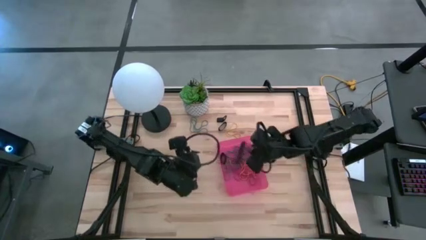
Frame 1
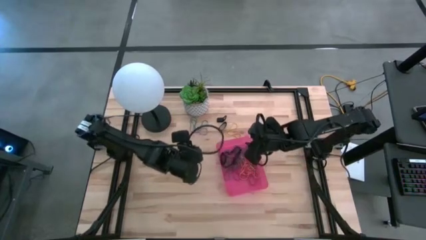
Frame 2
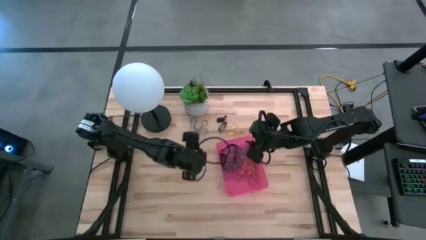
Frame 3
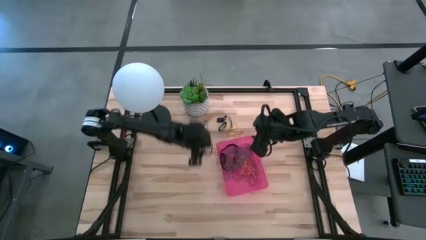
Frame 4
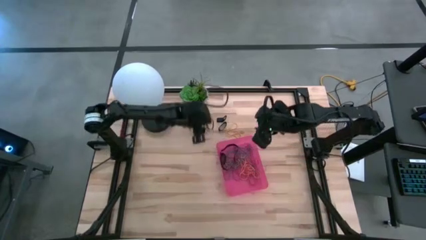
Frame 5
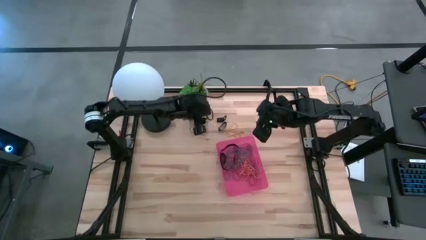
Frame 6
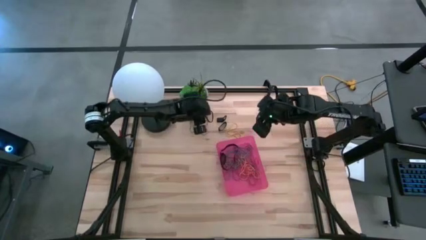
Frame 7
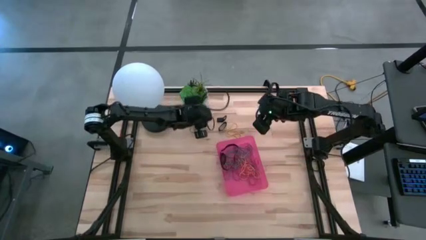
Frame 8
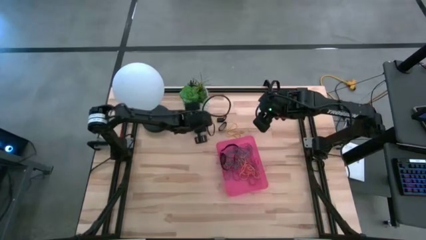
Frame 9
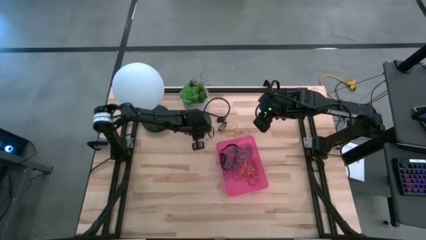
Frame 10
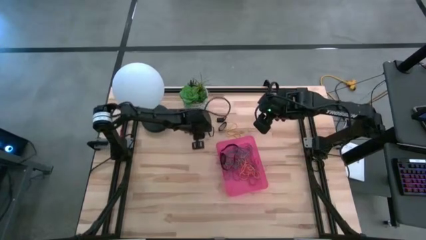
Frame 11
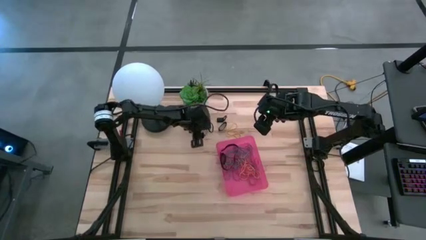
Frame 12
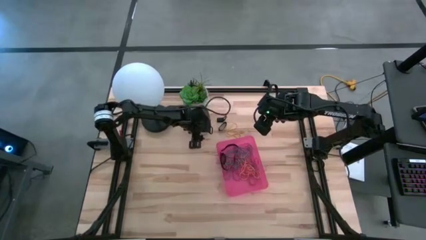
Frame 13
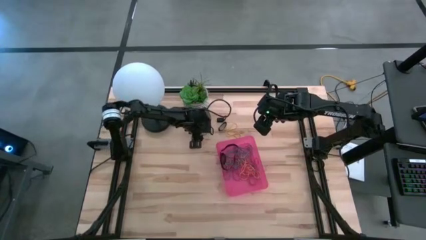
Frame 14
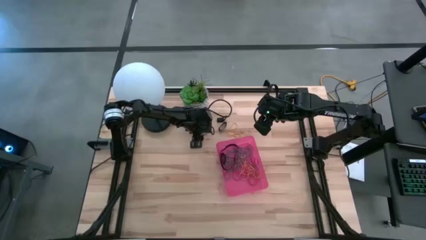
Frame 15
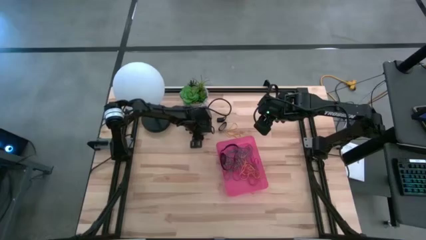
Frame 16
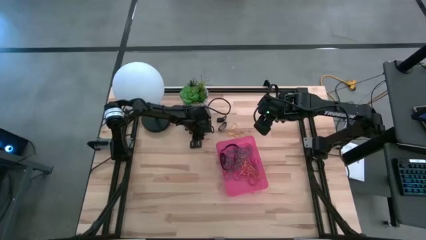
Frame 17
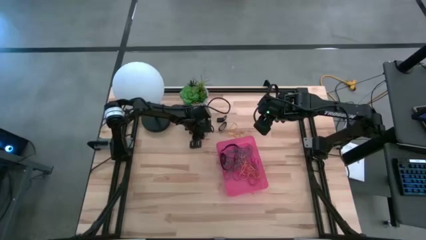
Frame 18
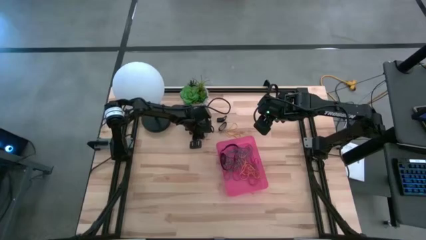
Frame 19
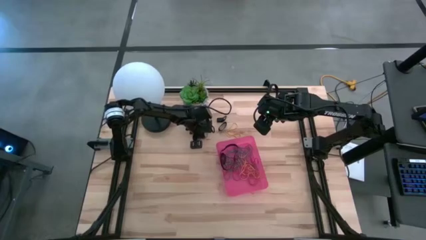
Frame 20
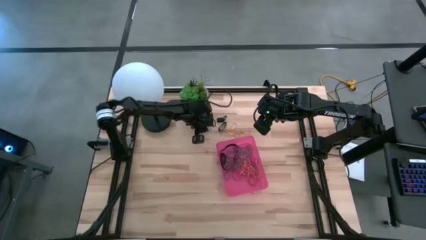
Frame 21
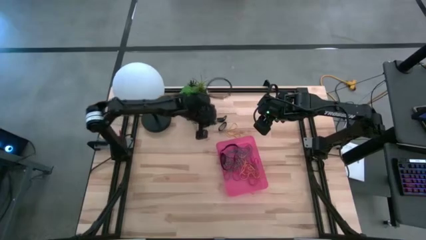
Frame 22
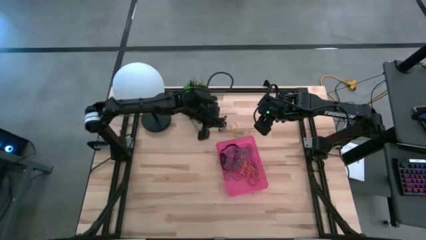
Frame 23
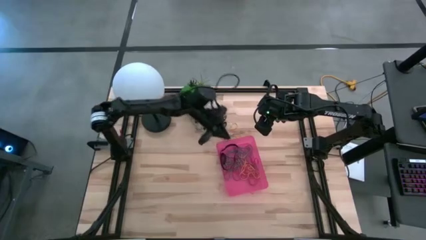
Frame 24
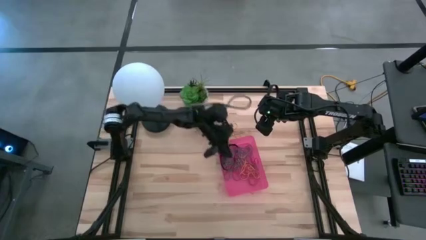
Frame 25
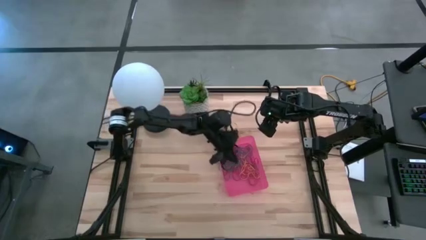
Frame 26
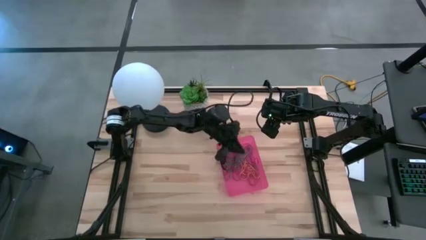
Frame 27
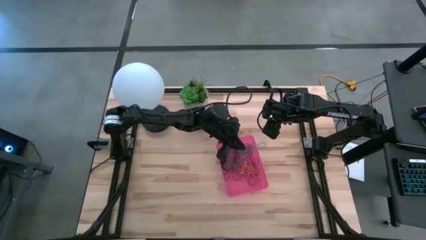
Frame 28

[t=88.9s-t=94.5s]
Task: Pick and place rubber bands into bin
Put the bottom blue rubber band into the red bin

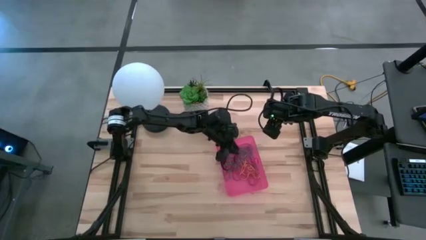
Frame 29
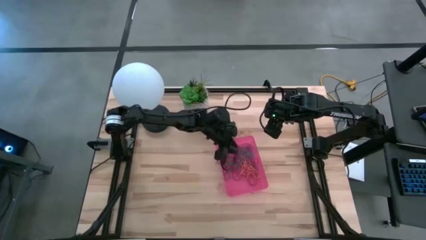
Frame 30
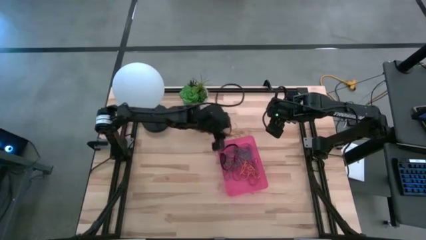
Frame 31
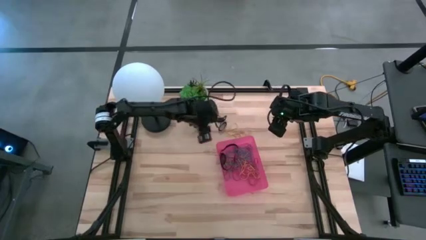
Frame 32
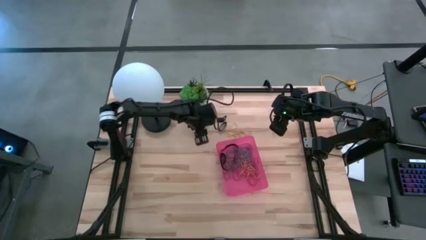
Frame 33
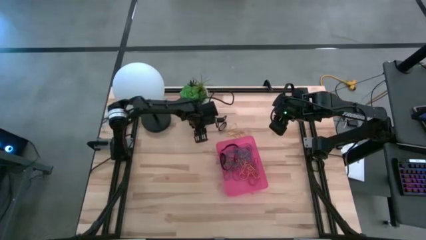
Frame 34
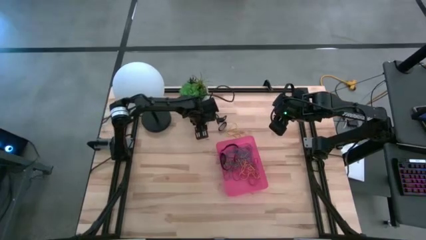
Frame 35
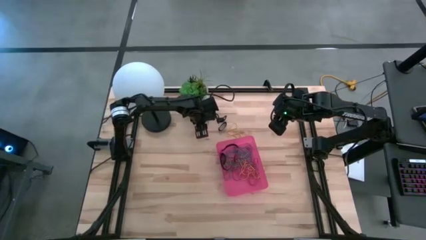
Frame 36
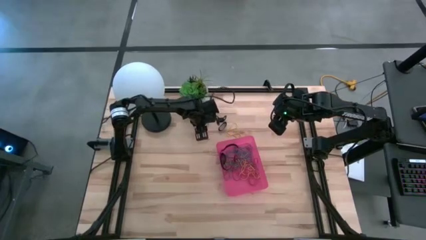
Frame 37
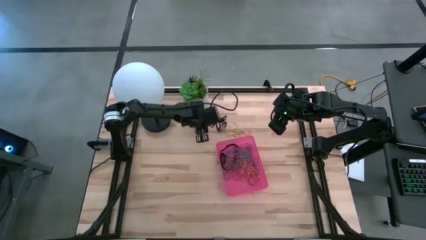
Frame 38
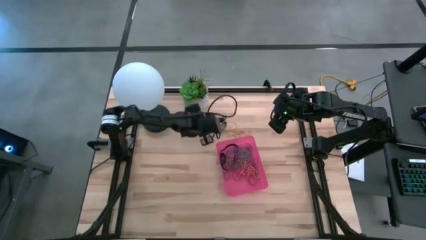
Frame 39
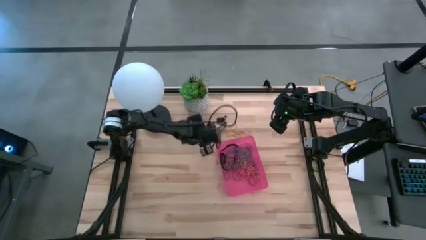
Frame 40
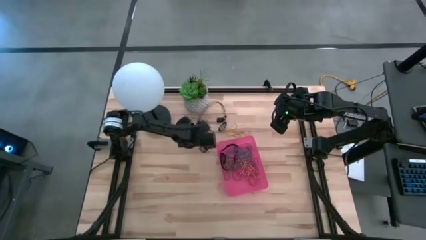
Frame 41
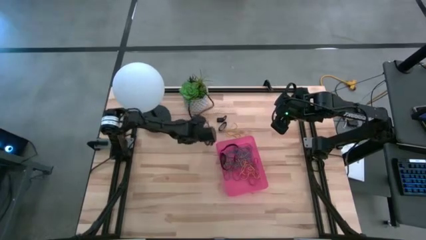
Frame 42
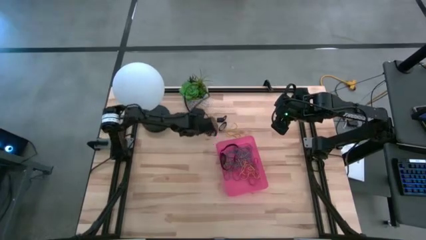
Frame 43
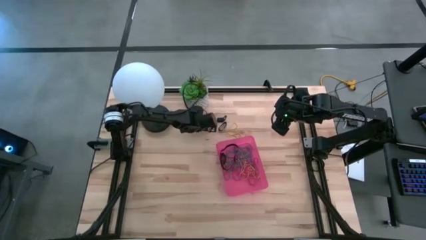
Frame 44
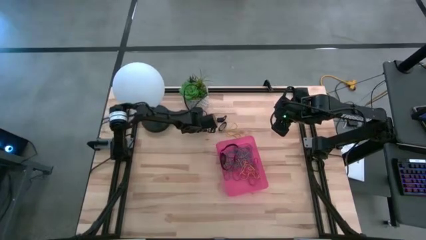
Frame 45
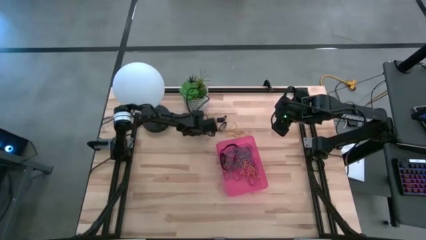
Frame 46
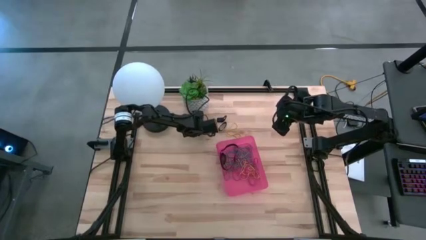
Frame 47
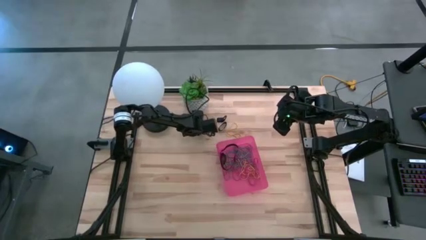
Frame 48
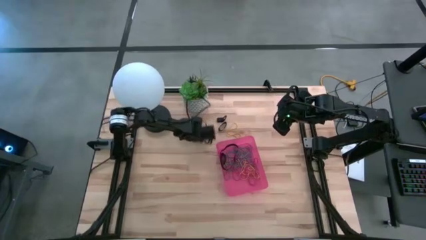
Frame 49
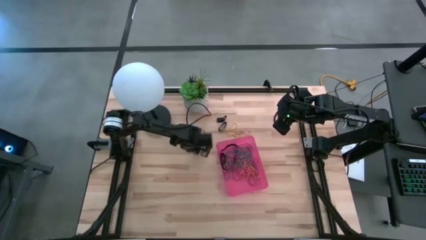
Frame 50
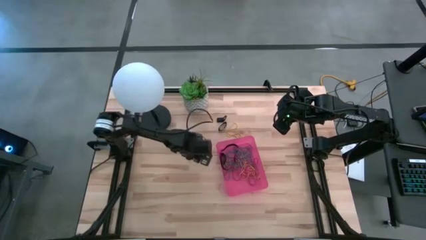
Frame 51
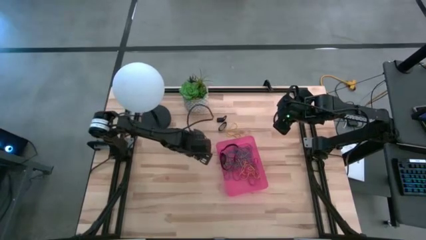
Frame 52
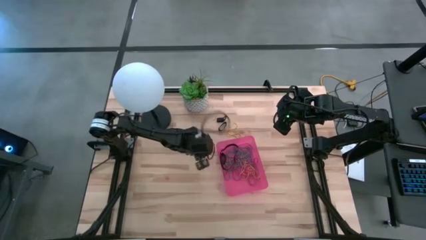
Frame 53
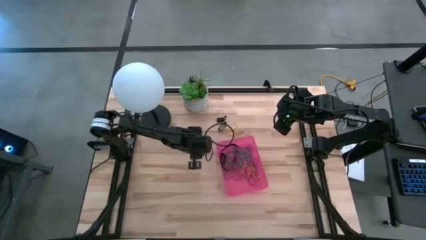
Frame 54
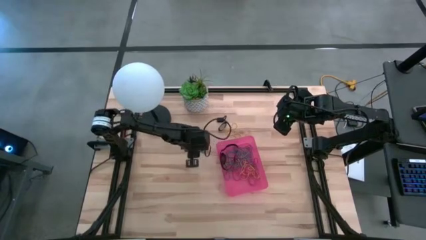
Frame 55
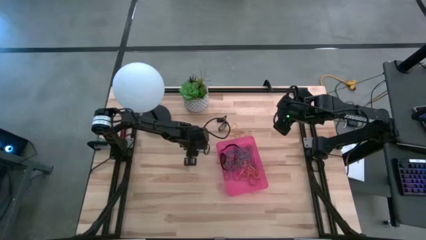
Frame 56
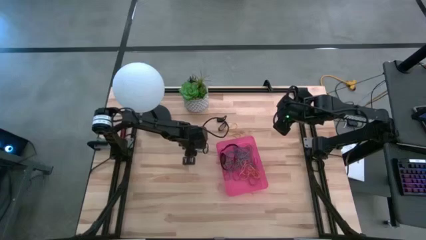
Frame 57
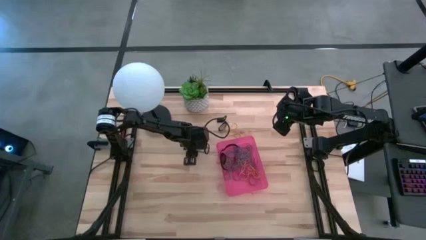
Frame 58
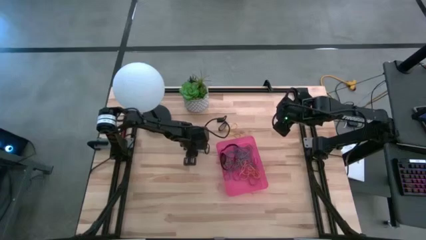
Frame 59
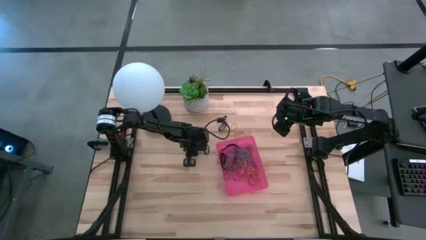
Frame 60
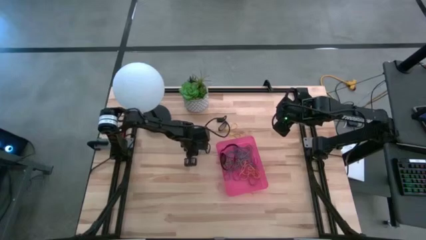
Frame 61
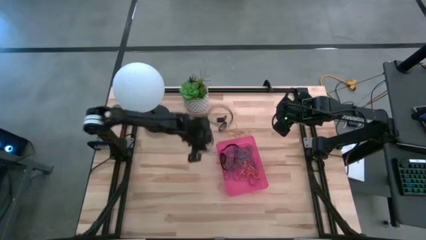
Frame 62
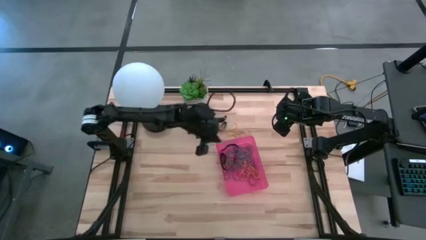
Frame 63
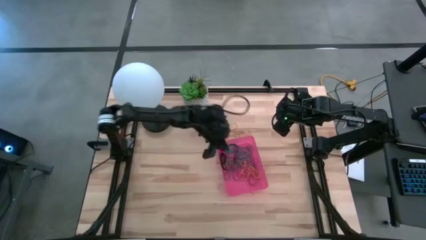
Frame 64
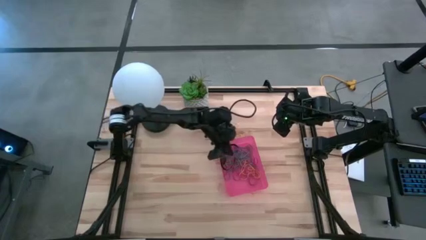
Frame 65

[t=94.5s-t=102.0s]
Put the blue rubber band into the red bin

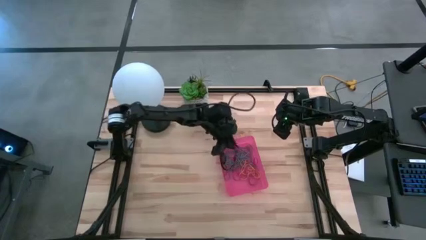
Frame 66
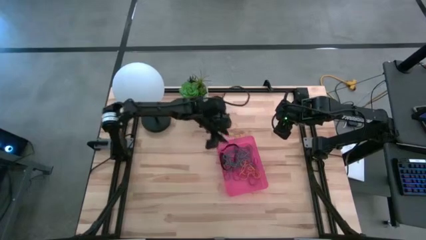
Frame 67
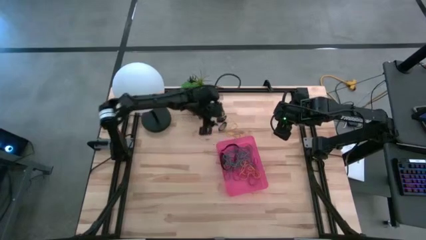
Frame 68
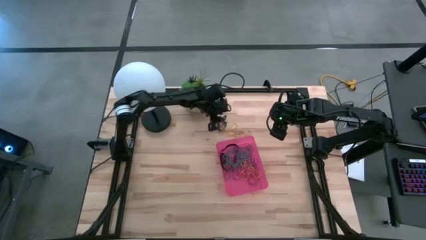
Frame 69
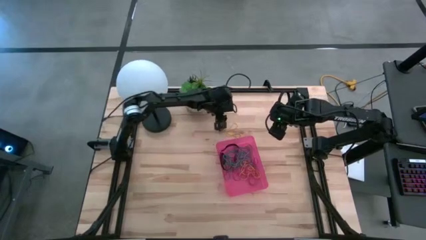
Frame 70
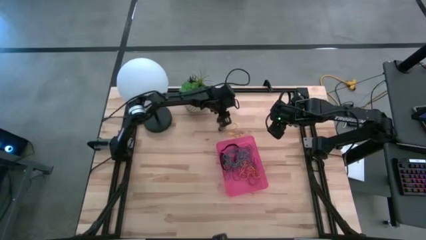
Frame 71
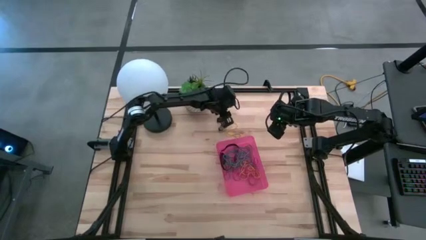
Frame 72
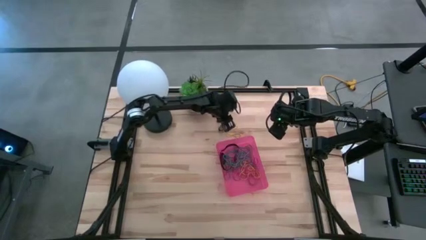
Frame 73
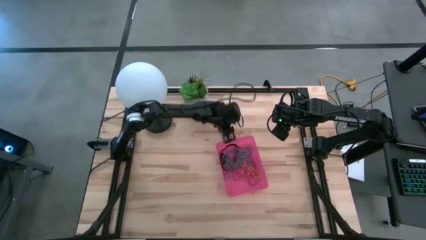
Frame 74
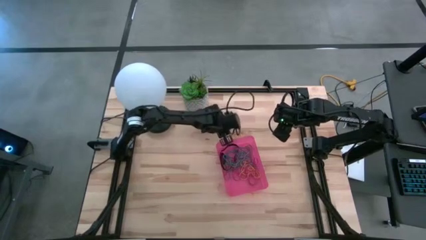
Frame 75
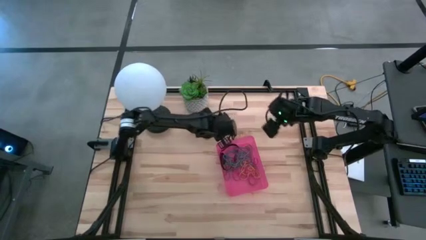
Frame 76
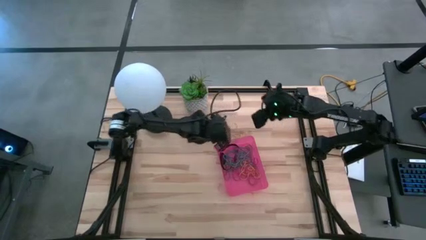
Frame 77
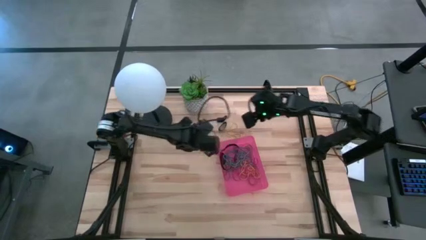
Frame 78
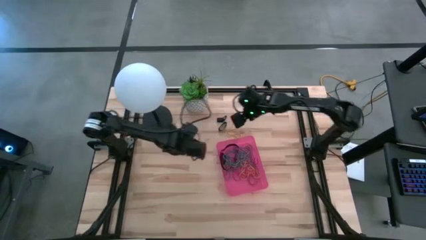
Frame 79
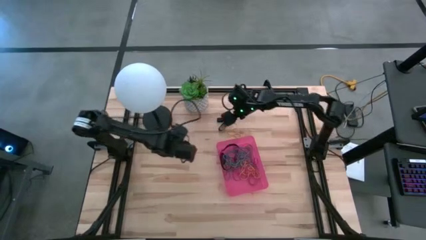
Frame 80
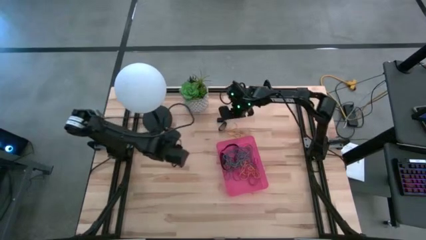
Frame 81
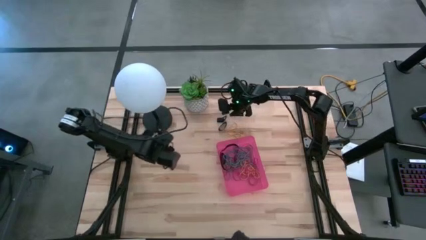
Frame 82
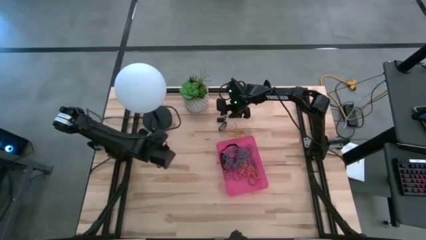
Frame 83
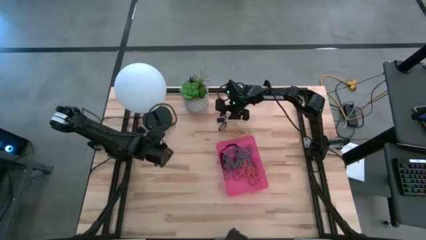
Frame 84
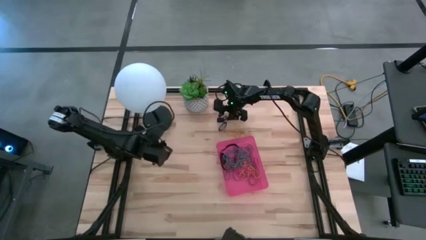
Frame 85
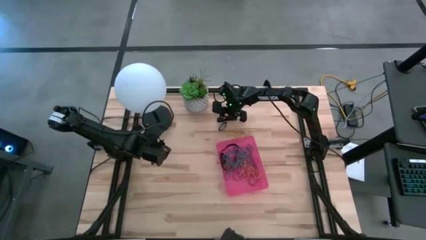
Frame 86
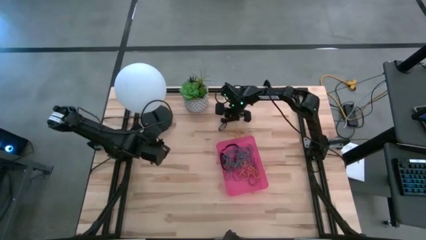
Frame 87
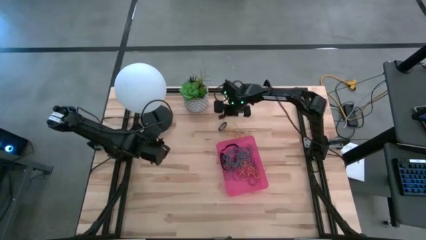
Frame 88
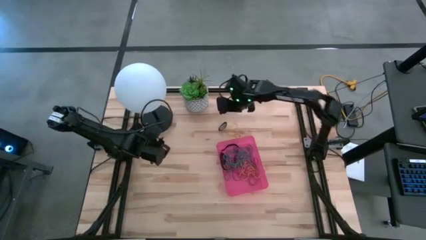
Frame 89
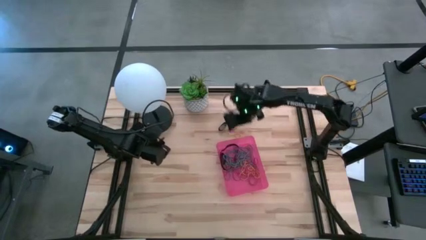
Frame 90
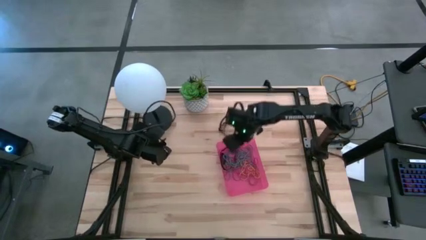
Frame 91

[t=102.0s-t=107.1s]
Put the top black rubber band into the red bin
